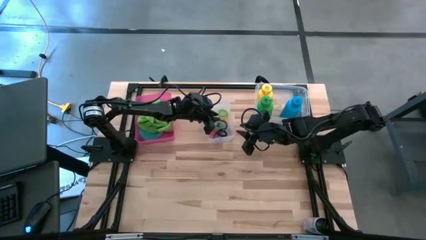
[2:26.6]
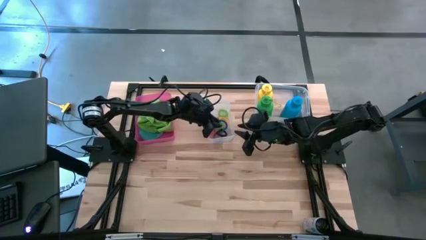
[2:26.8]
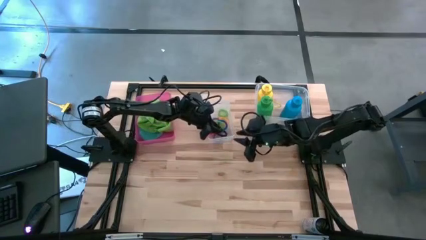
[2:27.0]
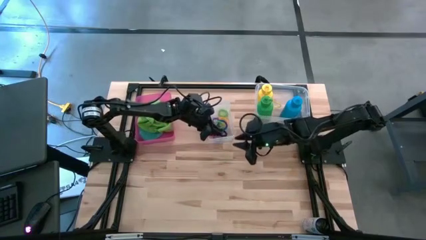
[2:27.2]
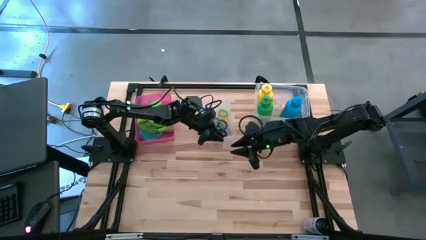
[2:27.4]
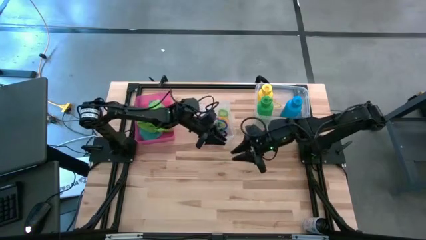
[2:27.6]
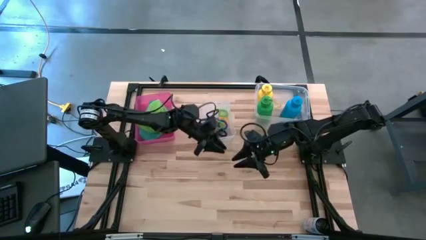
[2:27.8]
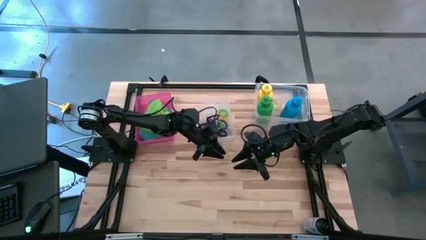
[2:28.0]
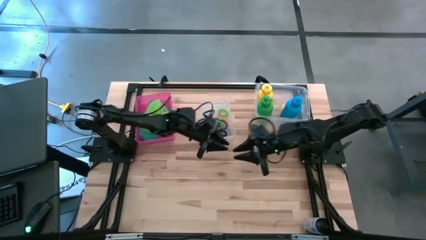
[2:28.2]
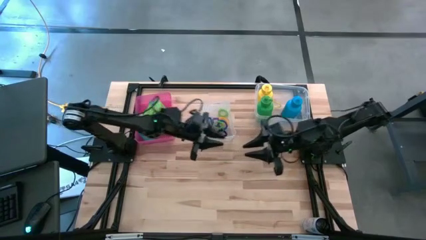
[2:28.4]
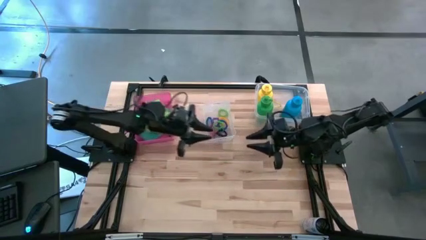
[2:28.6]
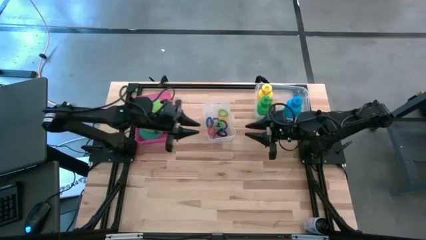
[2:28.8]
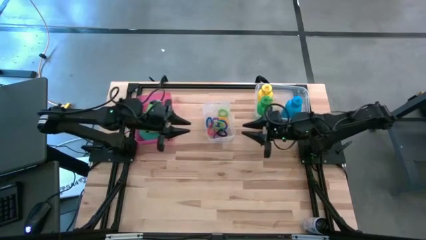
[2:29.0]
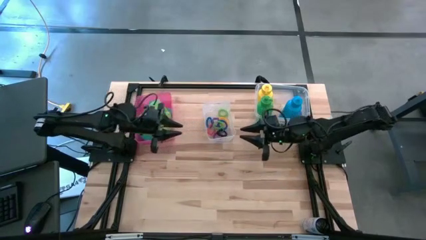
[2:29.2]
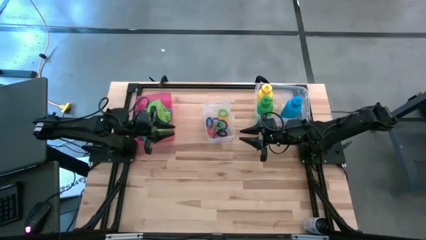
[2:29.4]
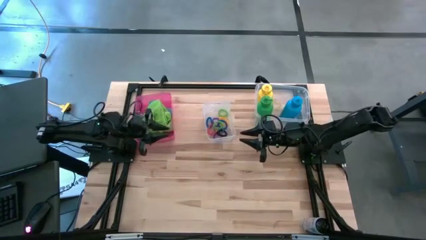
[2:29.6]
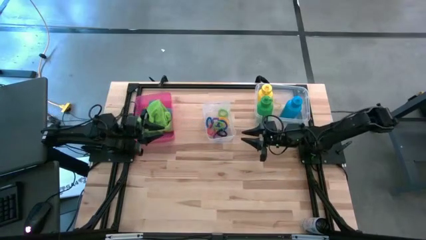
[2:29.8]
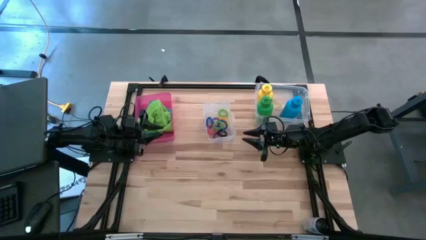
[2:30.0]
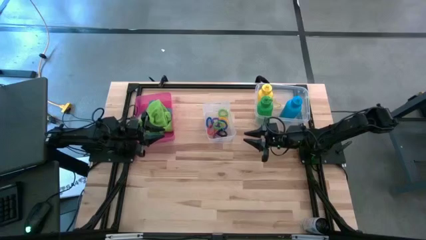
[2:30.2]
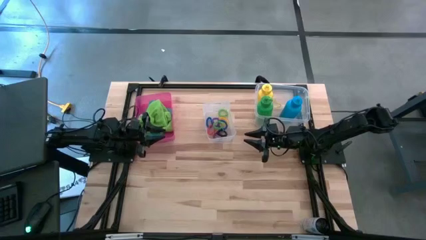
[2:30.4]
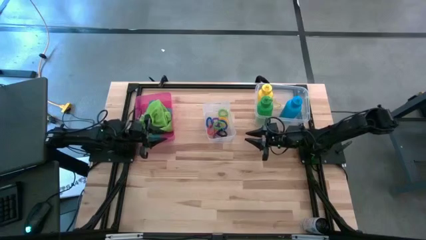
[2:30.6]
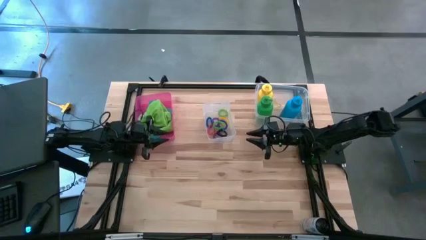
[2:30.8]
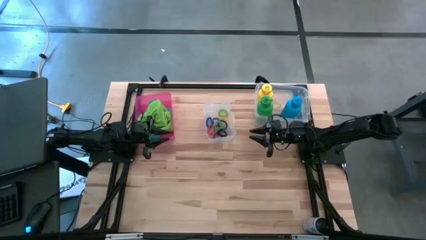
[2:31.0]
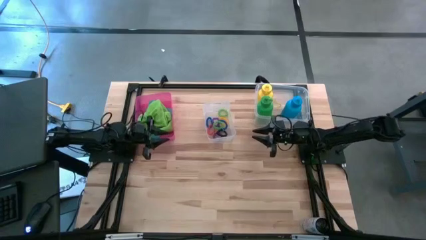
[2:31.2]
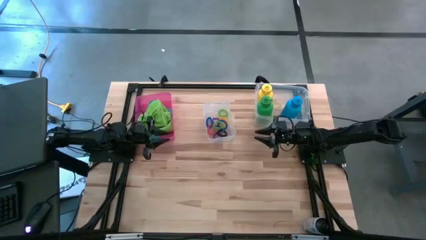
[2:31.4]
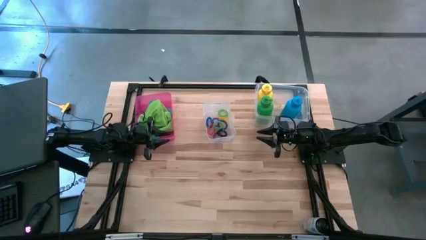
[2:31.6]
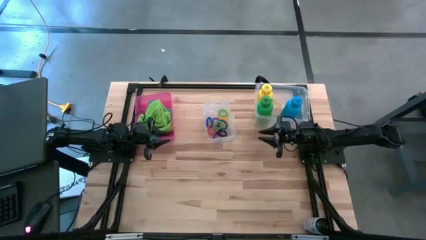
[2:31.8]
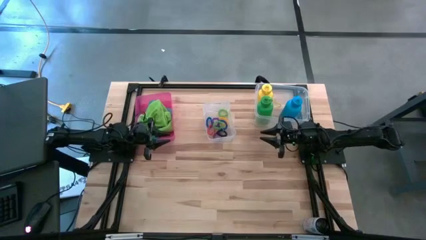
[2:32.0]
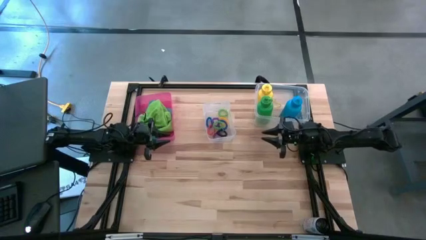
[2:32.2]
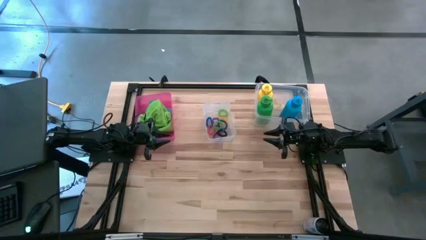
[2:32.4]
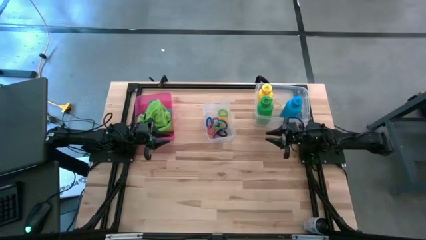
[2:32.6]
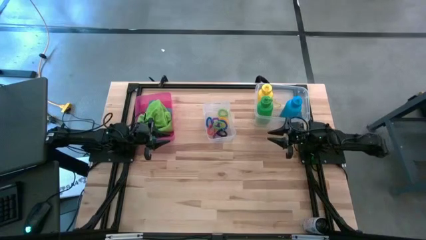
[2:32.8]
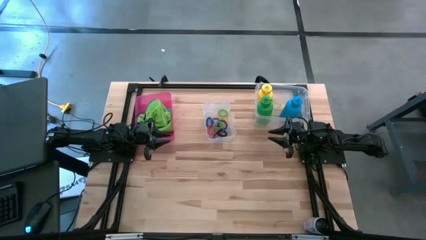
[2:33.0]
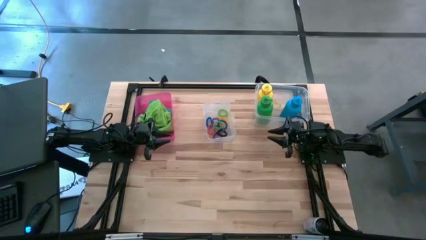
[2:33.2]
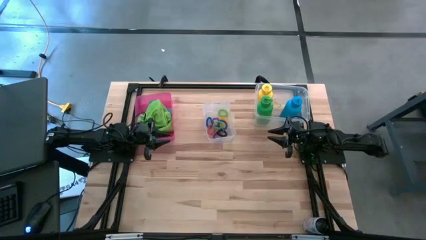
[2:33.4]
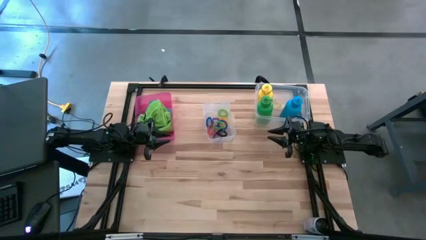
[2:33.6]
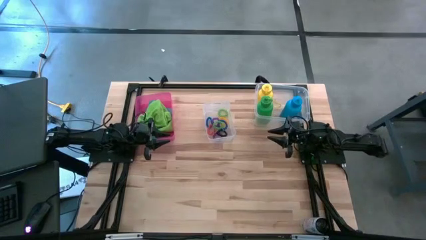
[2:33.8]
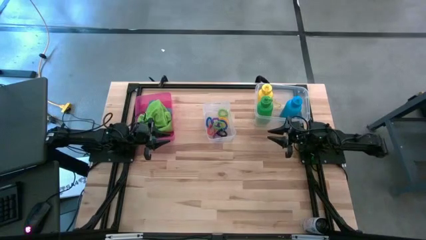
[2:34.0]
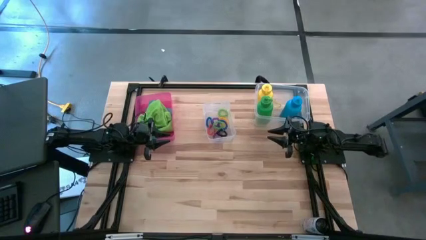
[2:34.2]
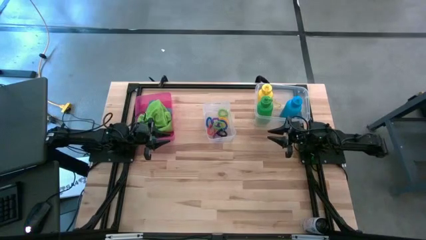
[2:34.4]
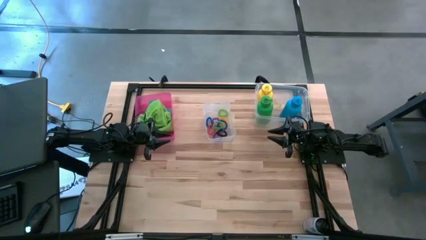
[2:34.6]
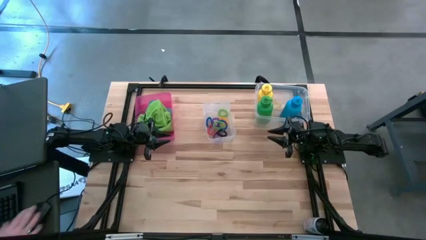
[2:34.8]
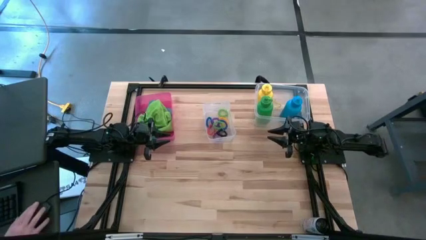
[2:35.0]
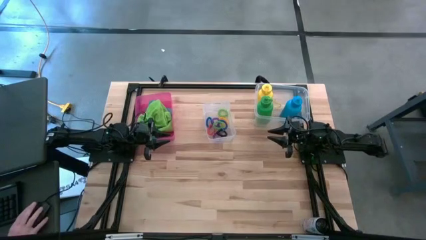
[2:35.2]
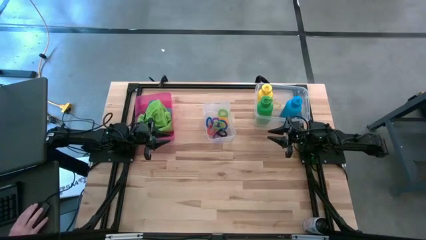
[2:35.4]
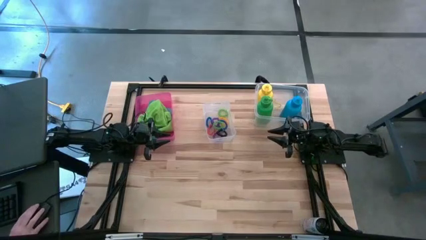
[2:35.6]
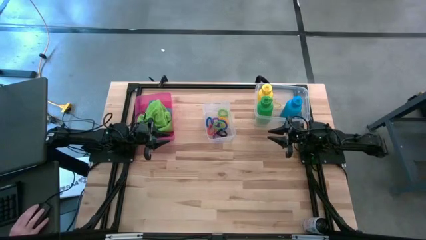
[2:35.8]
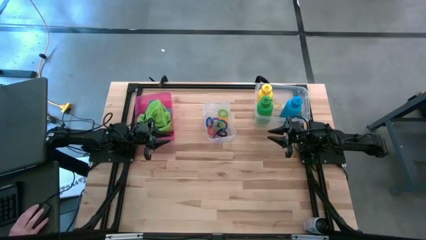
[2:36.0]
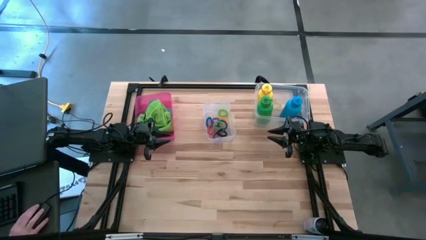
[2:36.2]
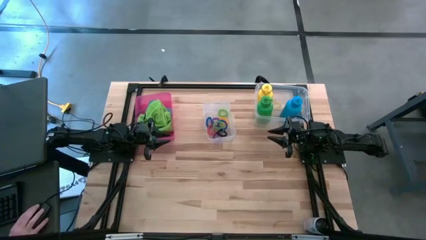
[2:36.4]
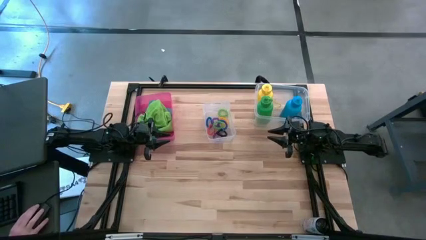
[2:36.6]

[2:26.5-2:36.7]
Task: Pick & Place Sports Items
Return to Home Position

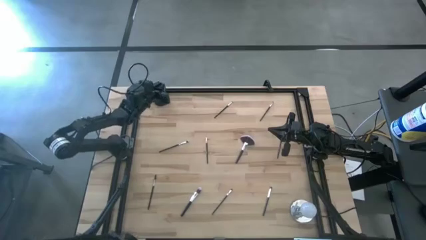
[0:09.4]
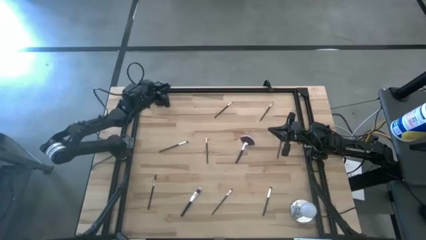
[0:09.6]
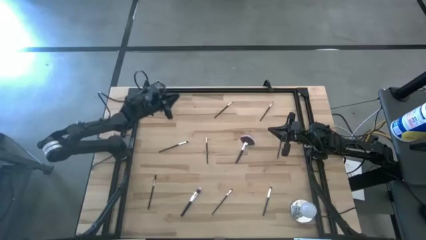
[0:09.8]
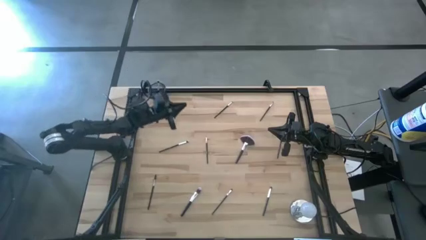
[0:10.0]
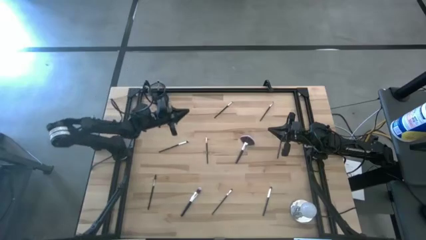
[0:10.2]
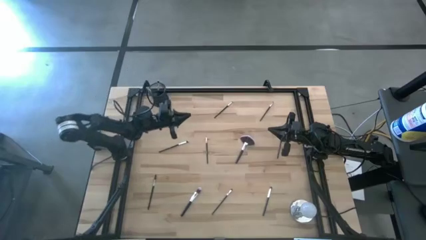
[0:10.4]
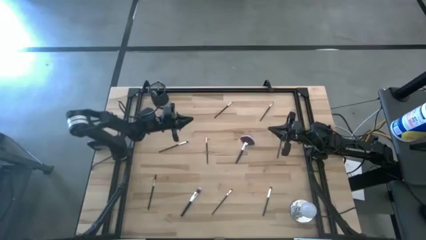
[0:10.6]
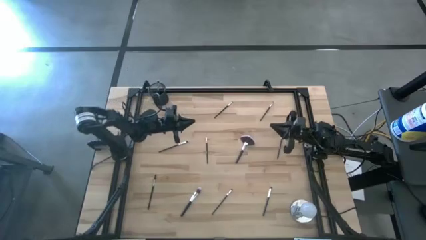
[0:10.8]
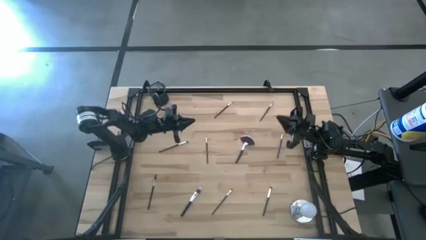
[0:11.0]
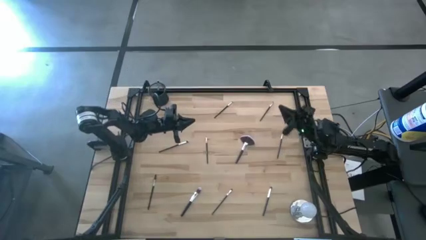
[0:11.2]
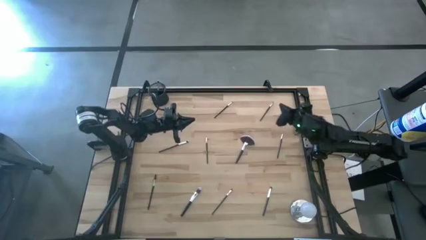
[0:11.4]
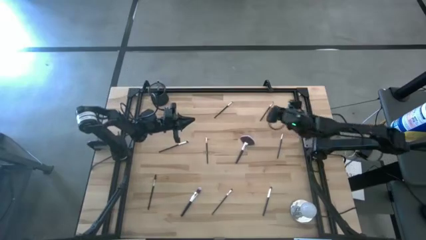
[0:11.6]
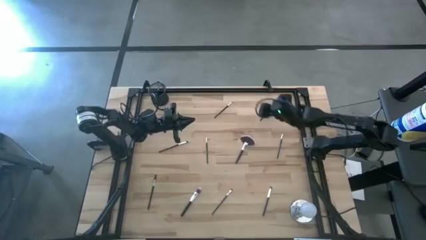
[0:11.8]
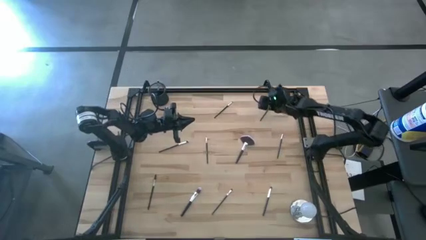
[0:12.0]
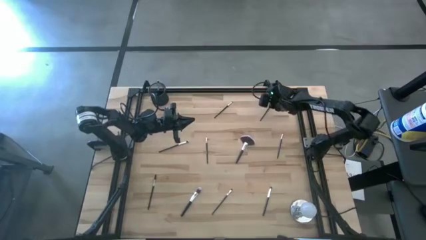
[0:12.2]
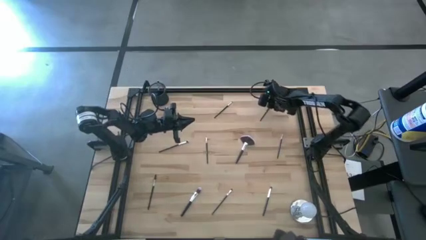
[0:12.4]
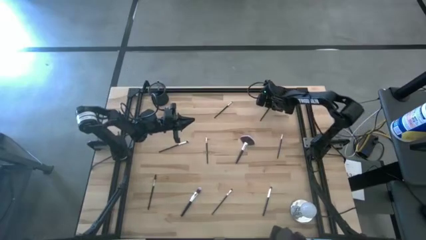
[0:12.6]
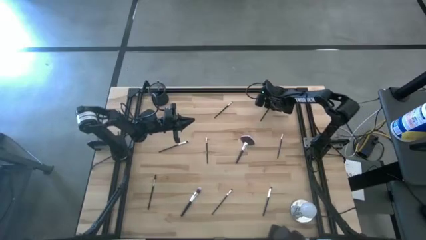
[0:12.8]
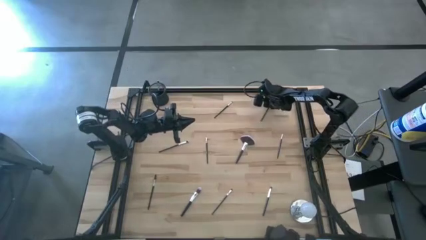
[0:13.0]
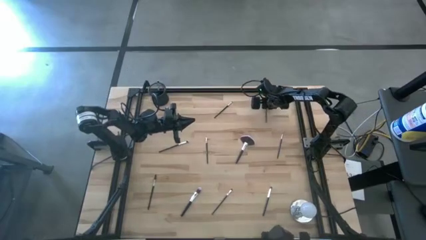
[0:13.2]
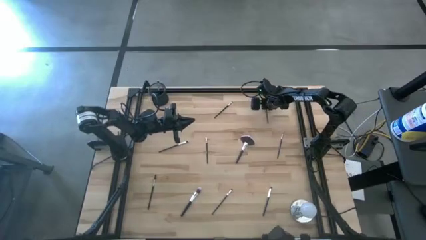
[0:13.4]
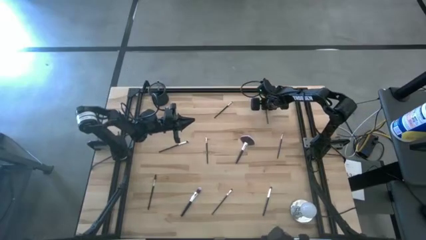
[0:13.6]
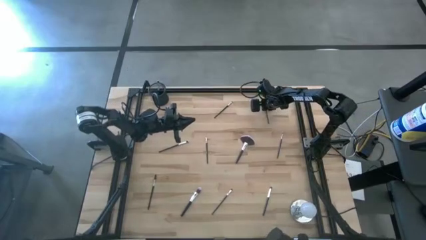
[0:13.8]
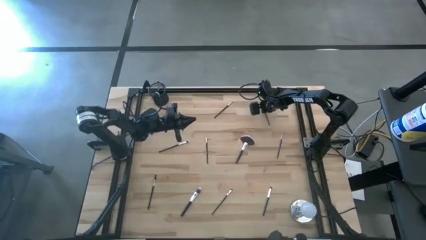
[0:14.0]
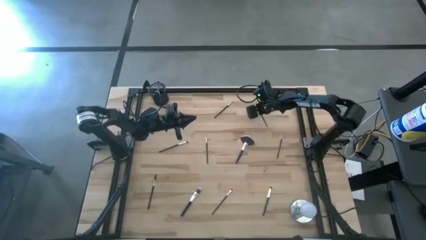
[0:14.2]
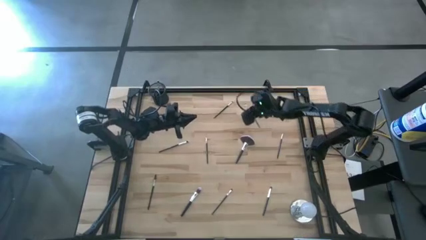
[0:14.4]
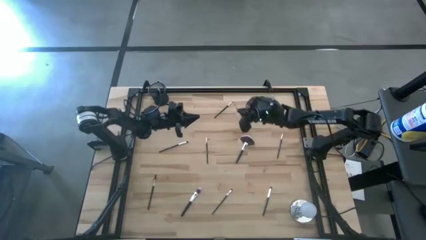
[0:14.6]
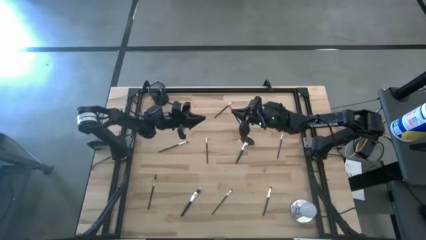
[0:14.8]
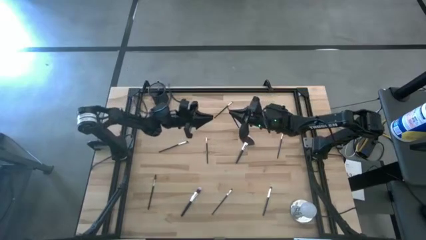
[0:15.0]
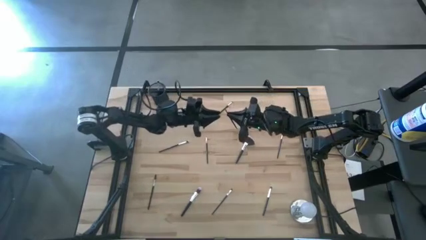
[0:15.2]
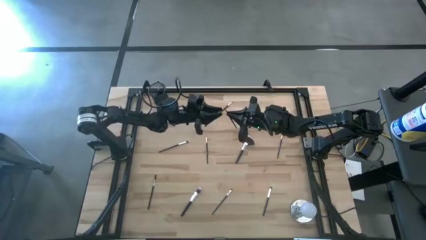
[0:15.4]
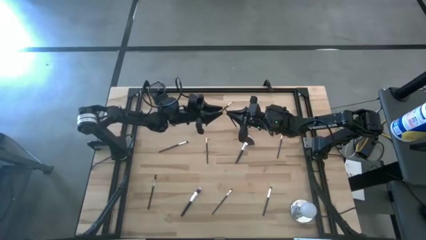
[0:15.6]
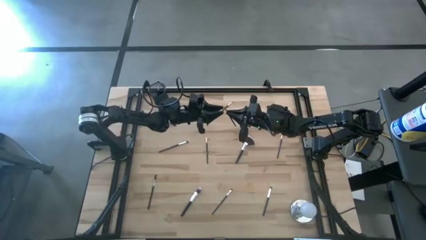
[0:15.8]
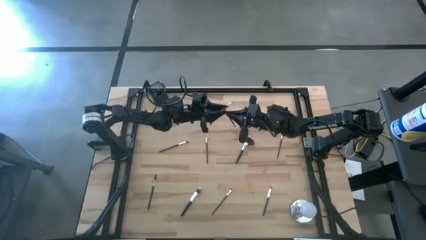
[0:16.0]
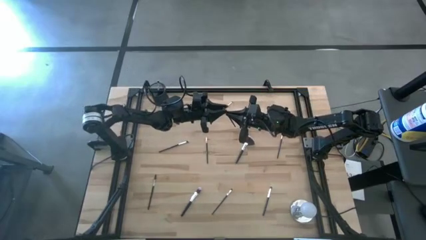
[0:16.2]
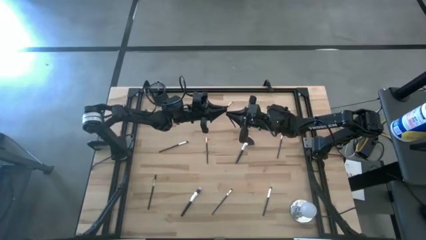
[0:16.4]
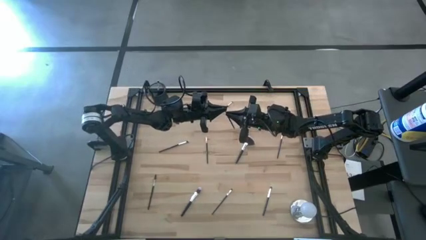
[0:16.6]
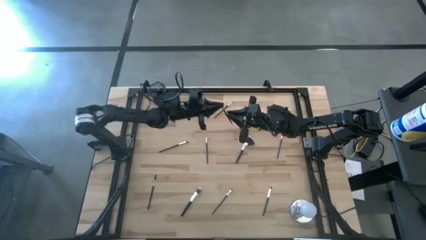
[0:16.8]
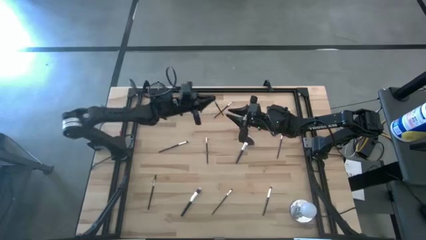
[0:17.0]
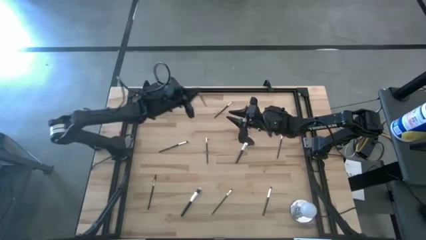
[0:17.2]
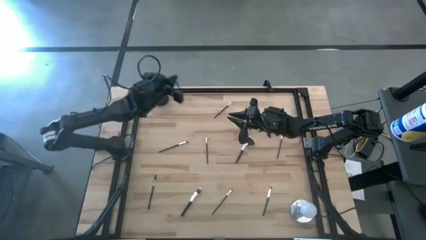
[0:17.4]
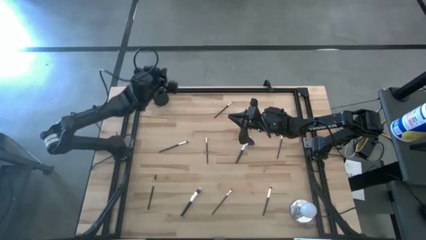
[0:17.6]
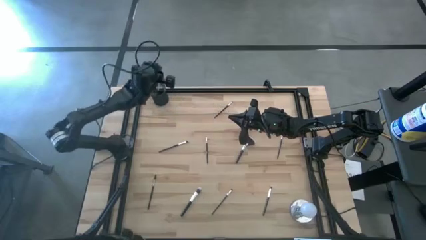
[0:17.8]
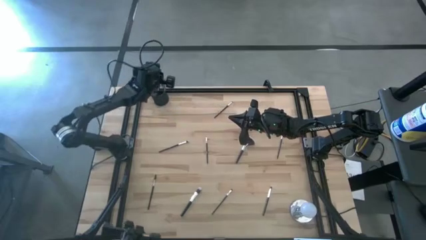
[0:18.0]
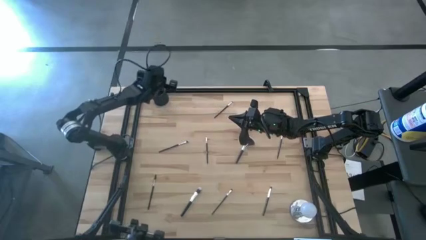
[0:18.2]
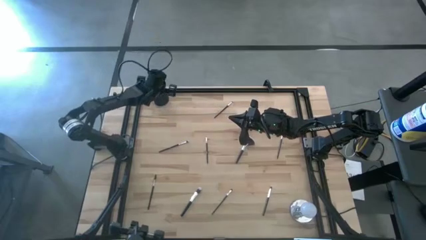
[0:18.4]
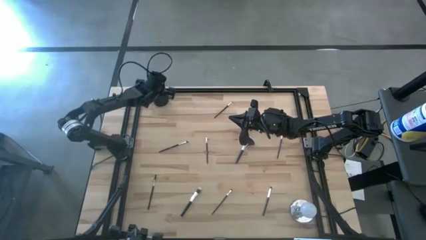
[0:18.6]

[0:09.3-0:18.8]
Task: Put items in baskets/containers
Put the eyeshadow brush into the holder
